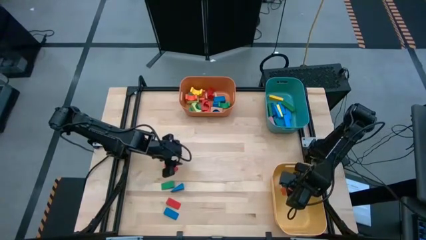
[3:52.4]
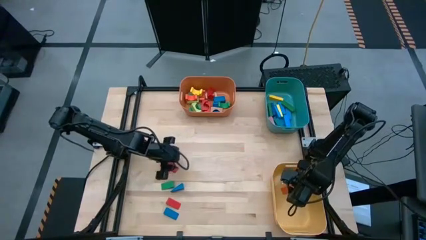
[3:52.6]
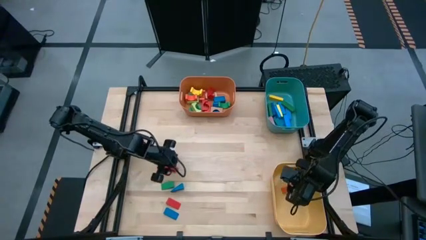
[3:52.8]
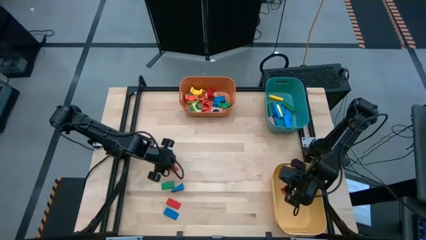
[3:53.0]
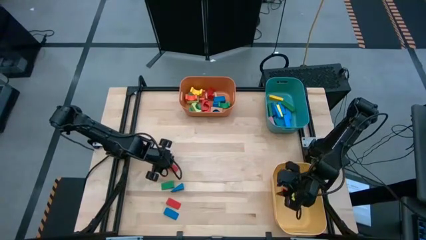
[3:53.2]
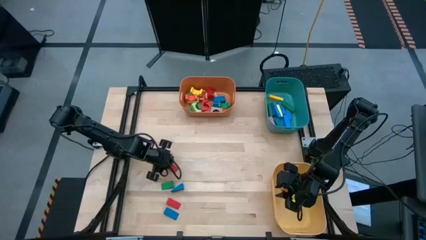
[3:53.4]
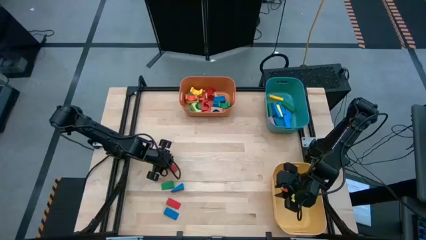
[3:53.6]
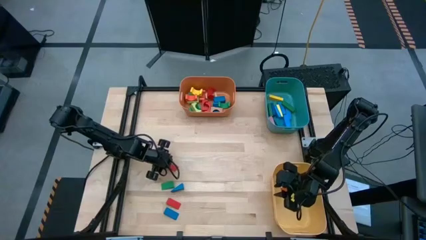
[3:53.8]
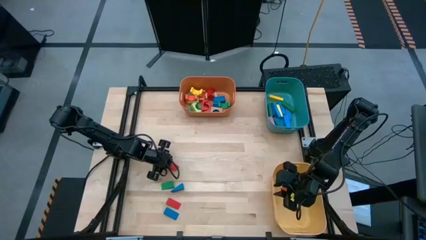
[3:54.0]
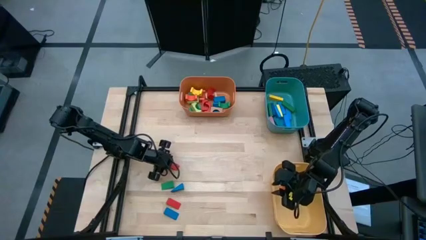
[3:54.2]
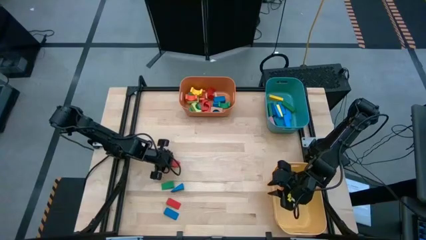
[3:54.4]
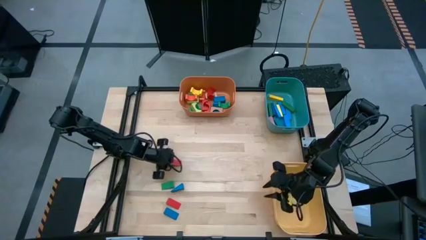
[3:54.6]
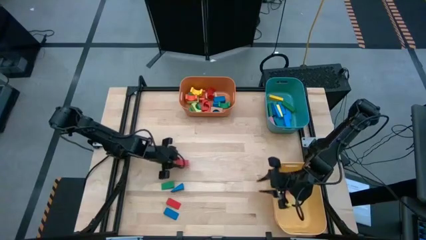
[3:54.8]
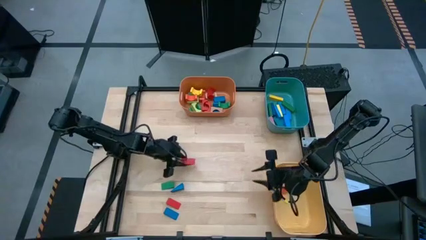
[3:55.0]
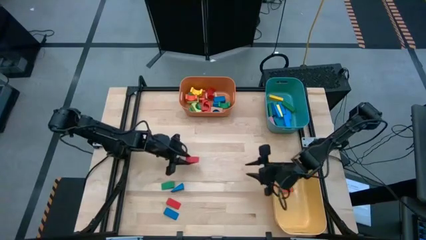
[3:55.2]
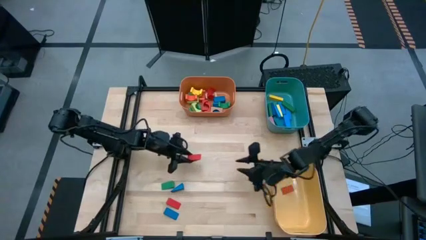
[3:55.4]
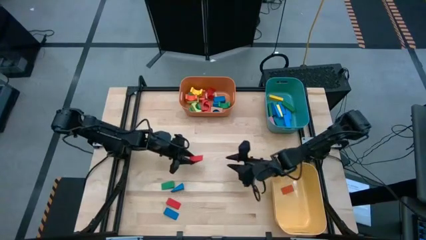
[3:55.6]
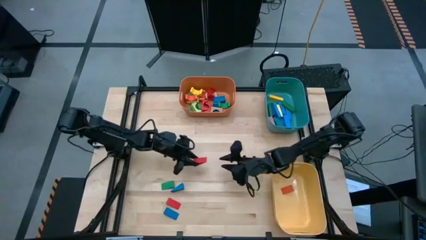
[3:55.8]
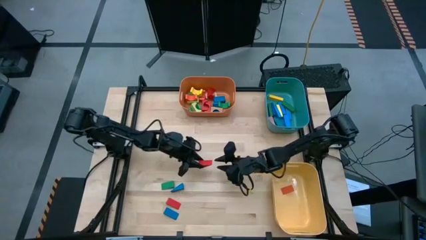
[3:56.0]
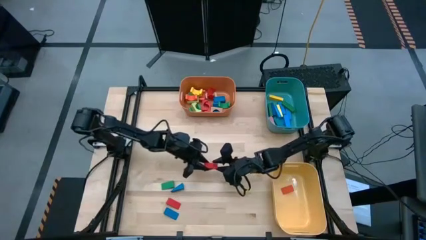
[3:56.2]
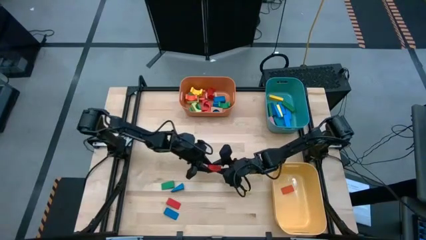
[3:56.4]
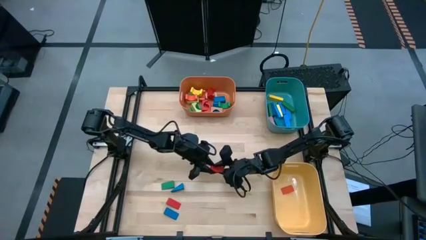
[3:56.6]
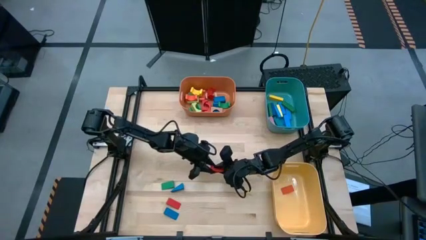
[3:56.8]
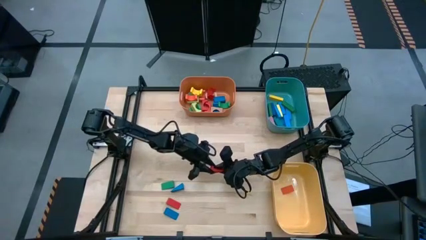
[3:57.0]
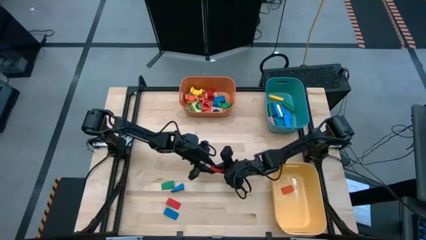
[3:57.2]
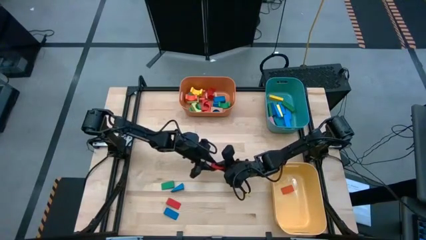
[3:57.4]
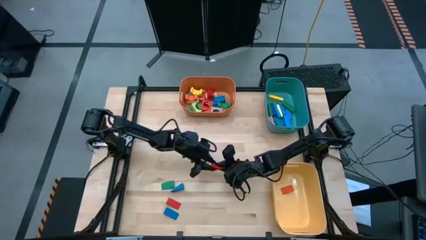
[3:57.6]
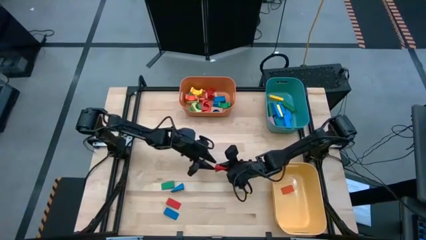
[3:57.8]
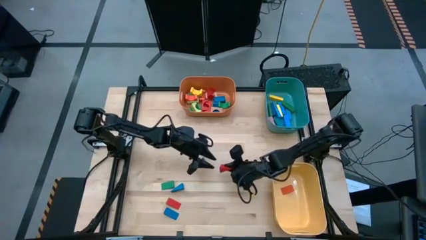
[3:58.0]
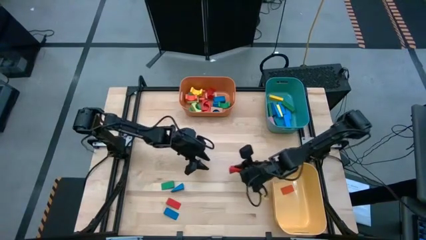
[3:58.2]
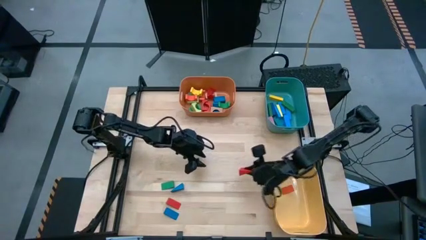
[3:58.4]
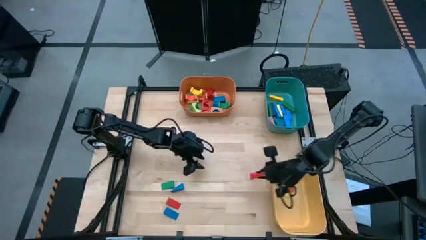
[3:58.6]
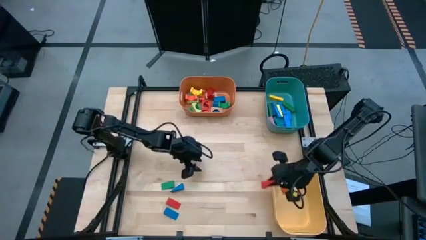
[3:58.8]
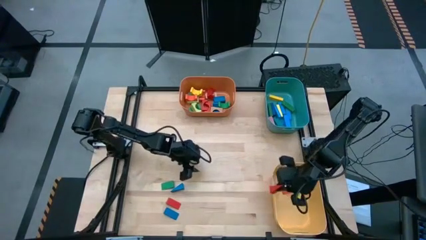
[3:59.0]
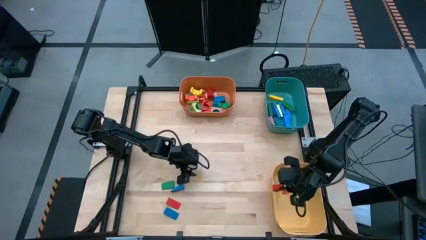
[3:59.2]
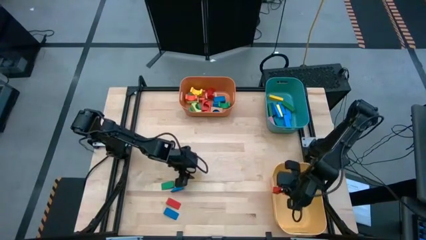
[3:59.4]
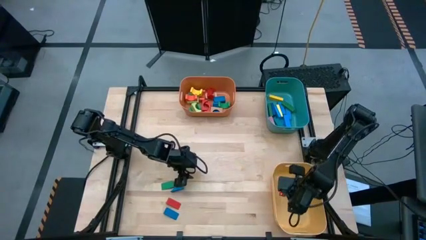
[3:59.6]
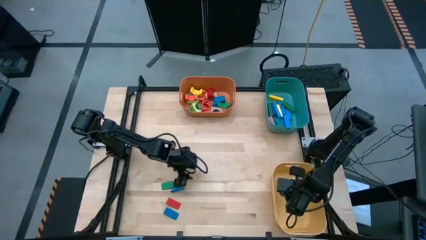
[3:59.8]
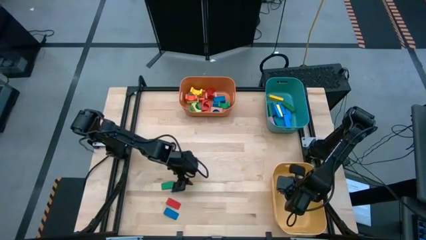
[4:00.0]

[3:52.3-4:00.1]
Task: Sort blocks by size
Put the red triangular block into the yellow bin

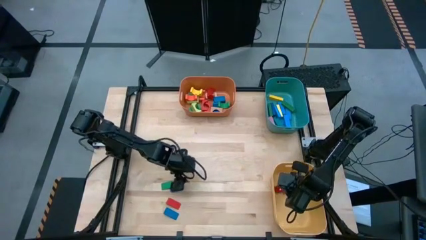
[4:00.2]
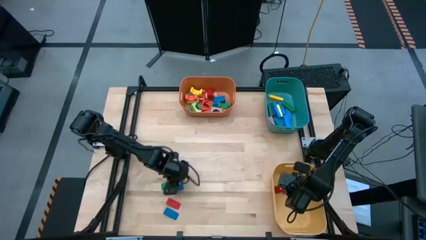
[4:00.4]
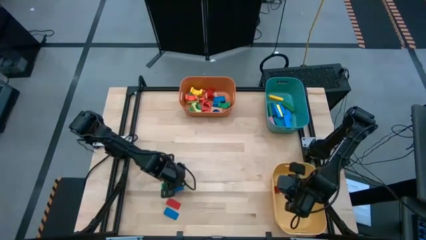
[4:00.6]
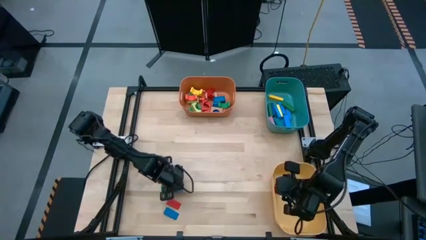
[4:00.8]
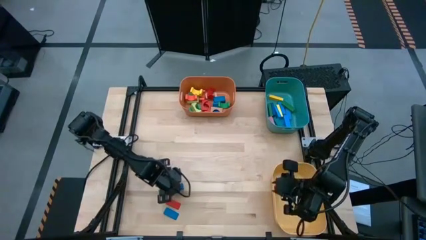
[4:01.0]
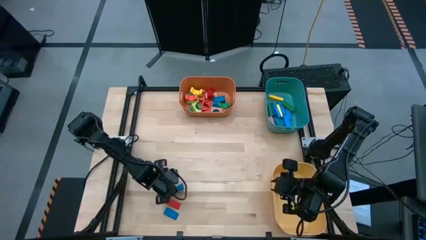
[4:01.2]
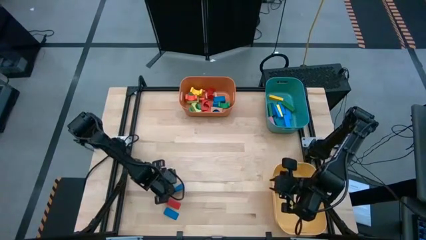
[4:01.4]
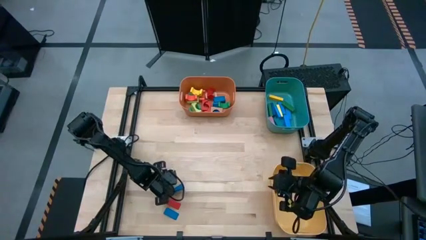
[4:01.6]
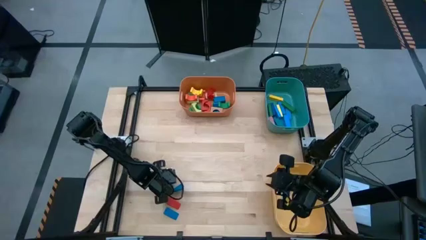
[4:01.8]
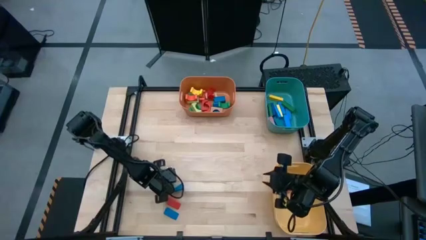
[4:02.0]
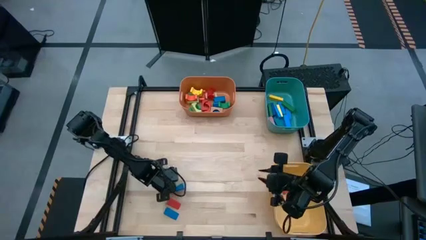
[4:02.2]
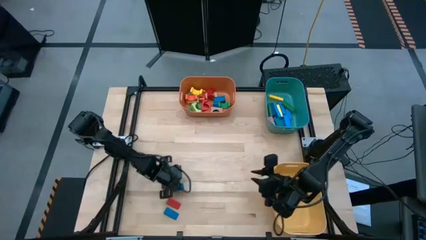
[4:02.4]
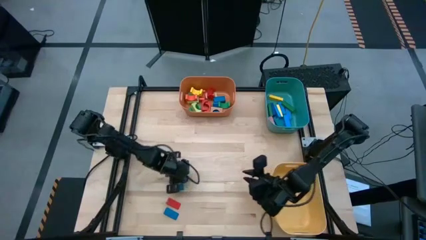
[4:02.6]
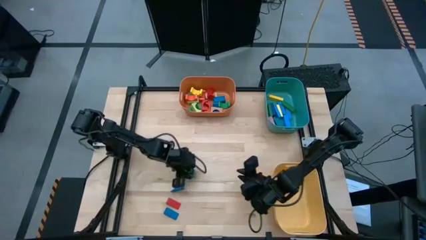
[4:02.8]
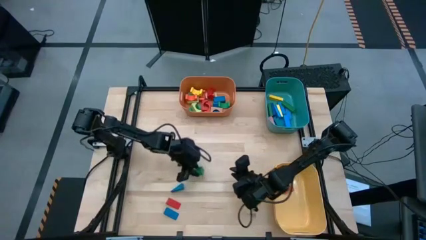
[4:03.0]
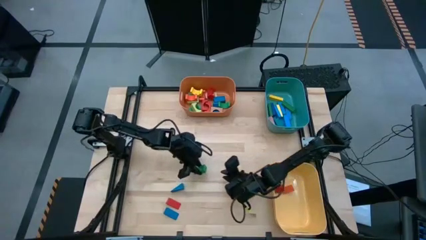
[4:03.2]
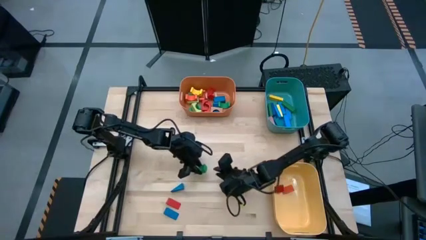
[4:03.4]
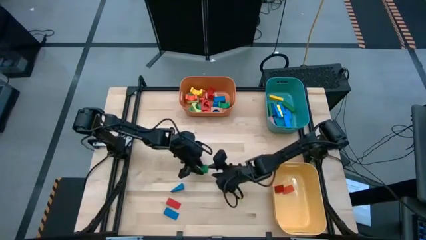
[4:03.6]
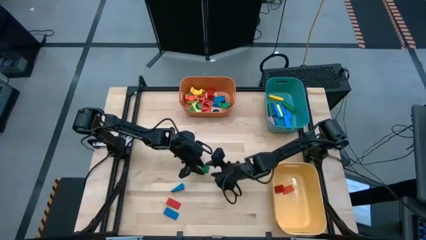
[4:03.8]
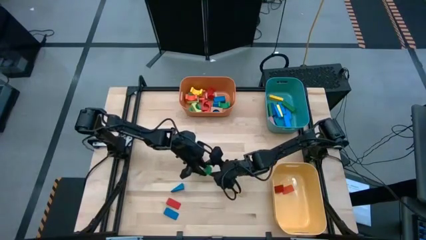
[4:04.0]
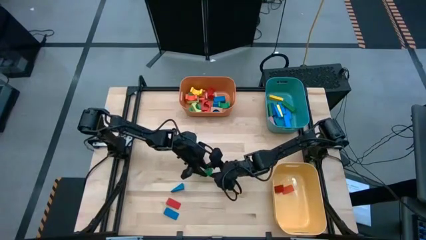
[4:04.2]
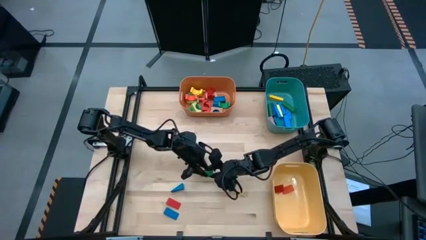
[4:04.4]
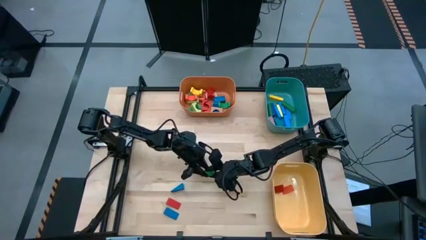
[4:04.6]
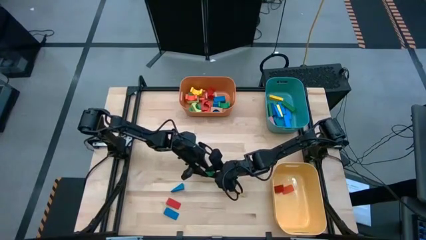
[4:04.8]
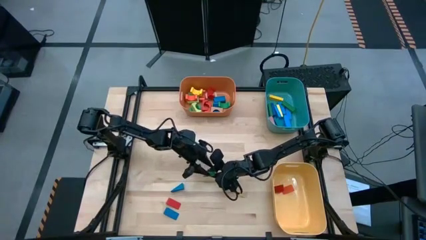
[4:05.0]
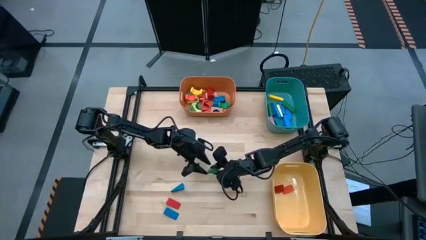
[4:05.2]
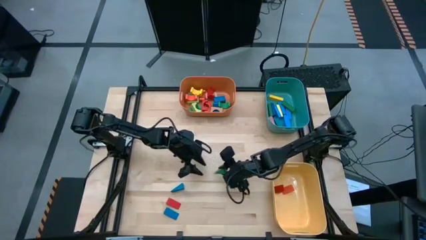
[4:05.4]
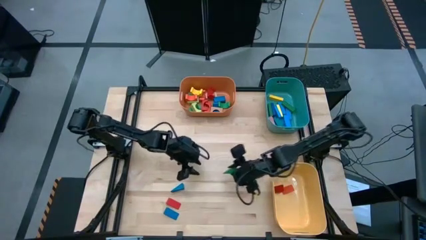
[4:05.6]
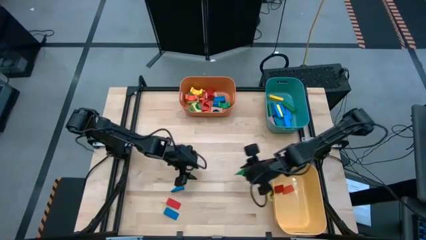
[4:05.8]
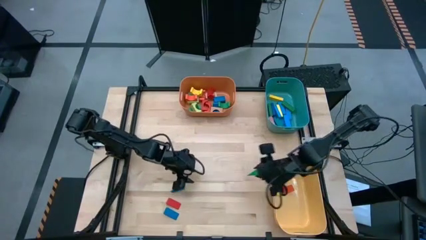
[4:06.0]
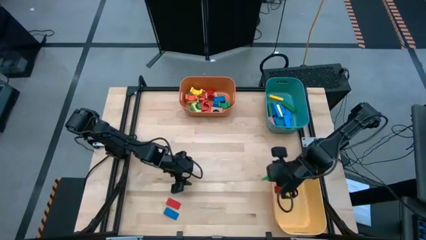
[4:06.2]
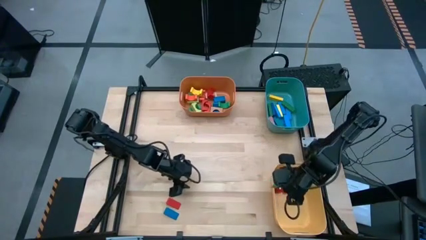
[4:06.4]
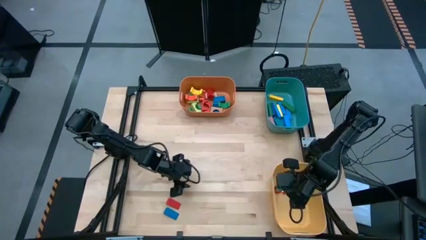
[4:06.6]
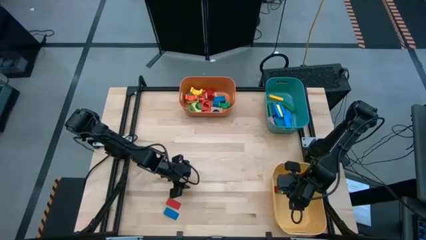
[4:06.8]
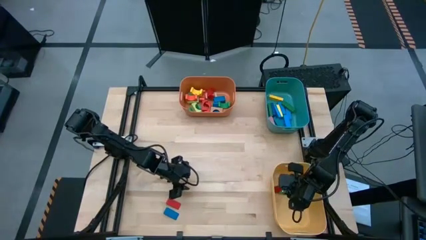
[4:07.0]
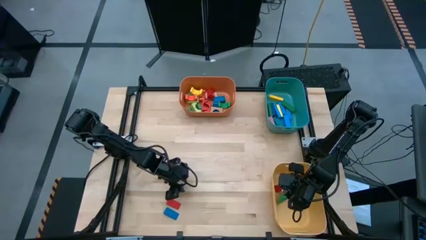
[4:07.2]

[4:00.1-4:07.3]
Put the green triangular block into the yellow bin
